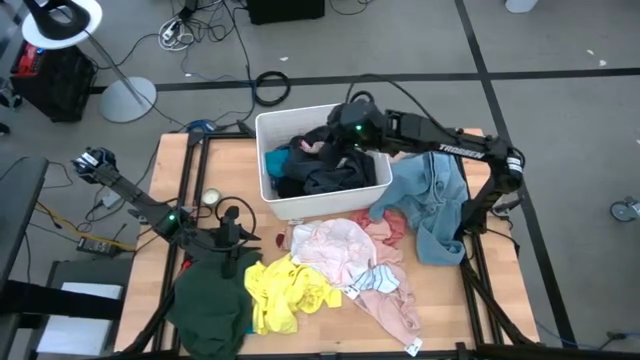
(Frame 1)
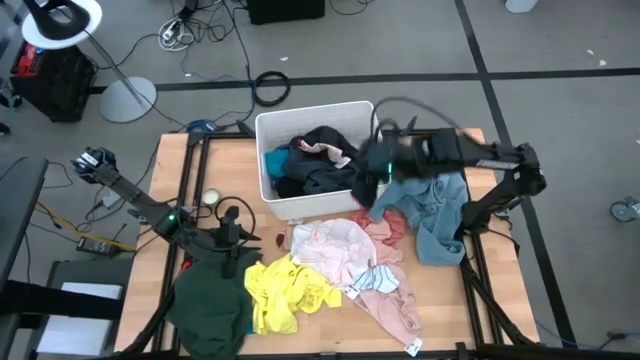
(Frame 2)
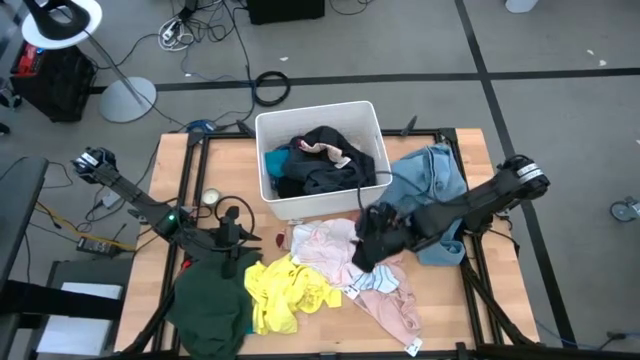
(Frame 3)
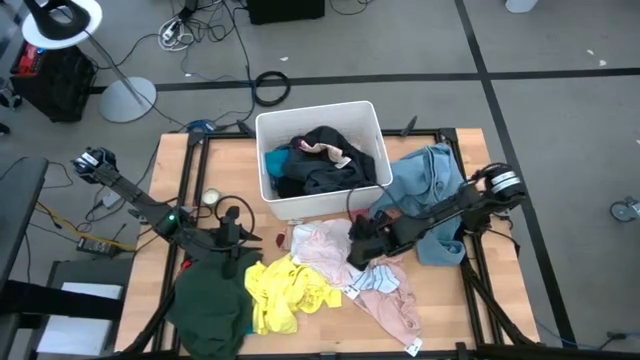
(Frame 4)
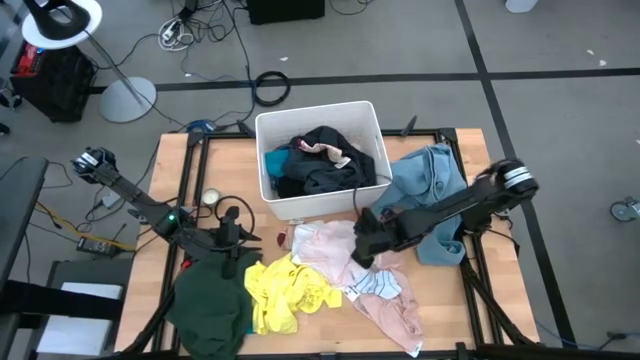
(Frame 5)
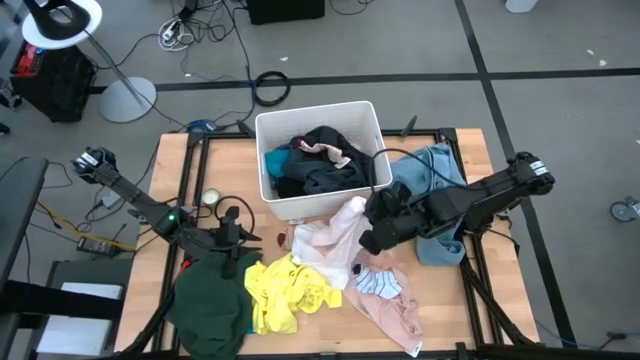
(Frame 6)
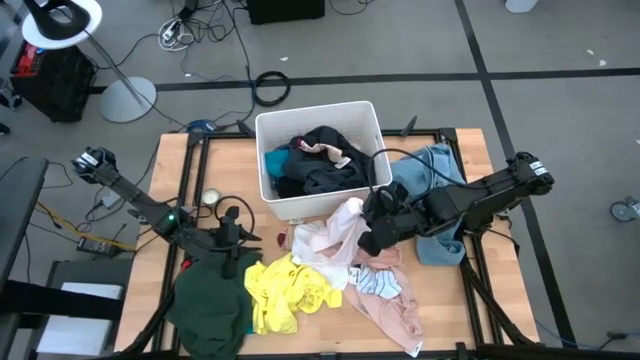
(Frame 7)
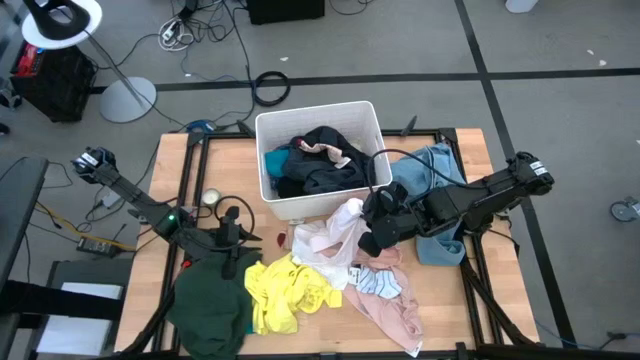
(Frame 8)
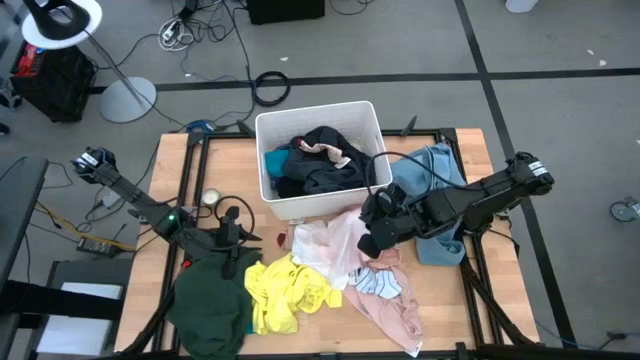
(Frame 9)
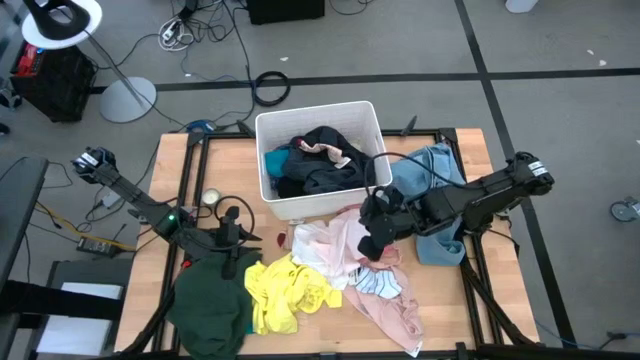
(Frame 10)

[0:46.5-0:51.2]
Task: Sort clothes
Put the light pink underwear into the white bin

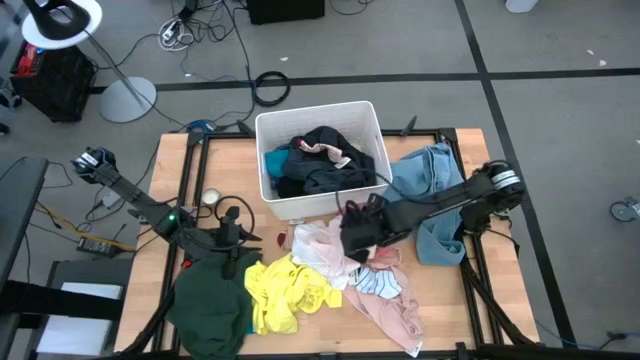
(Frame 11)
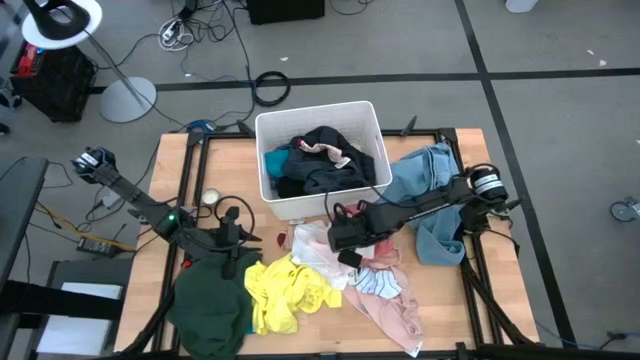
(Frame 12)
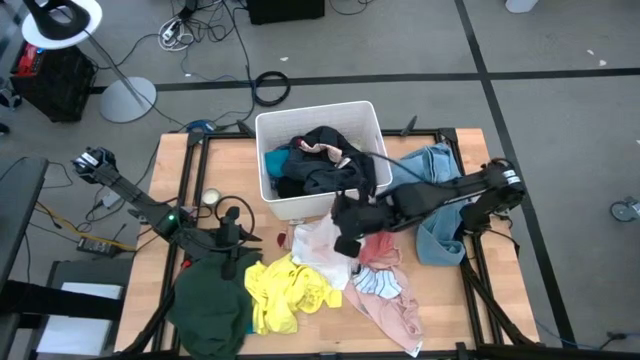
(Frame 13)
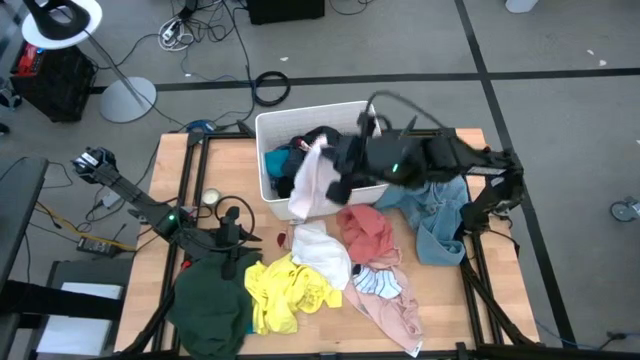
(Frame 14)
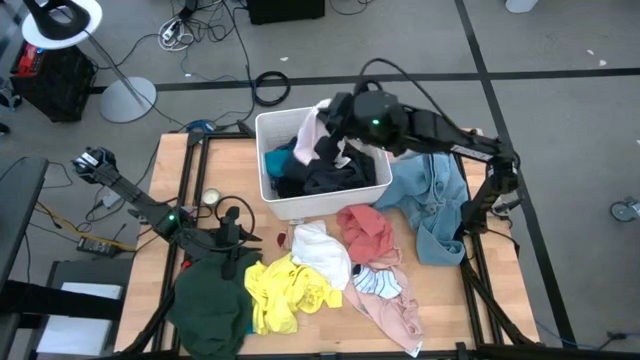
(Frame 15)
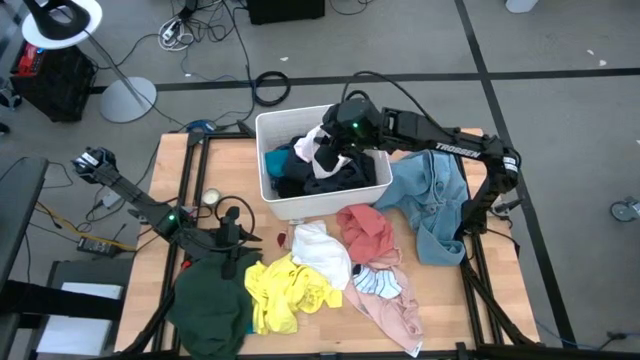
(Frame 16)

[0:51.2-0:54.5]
Put the light pink underwear into the white bin

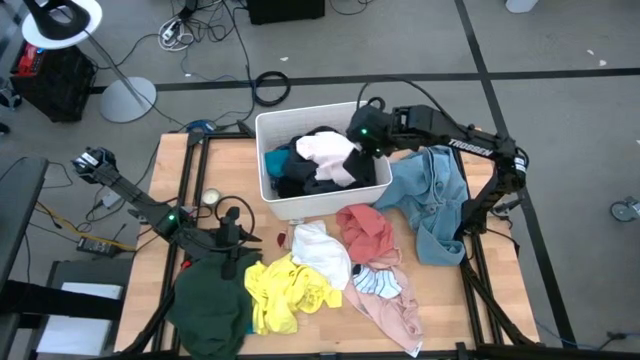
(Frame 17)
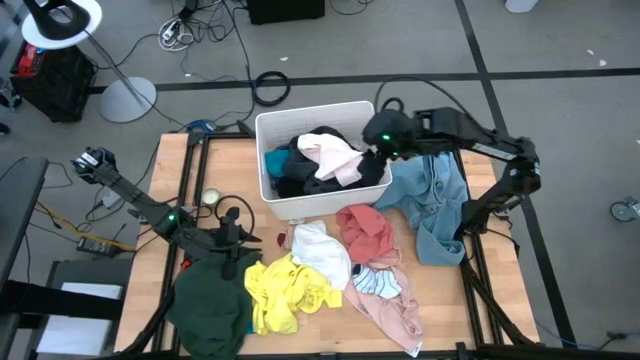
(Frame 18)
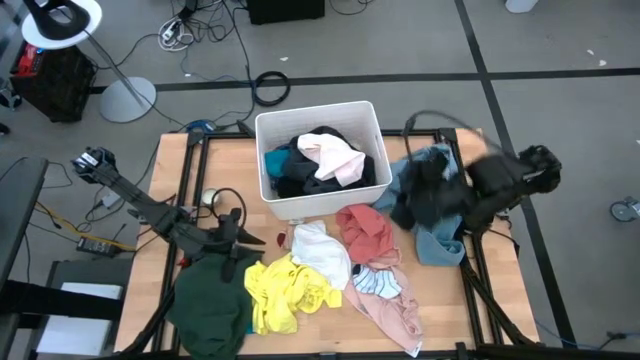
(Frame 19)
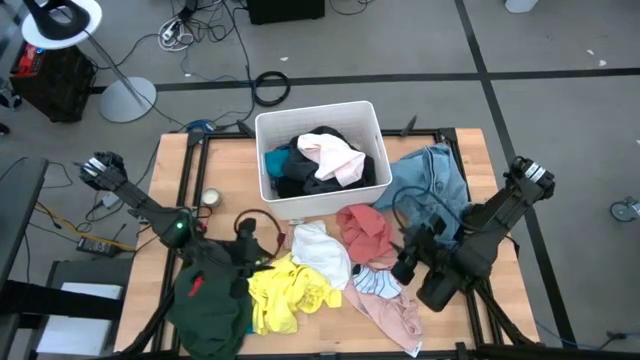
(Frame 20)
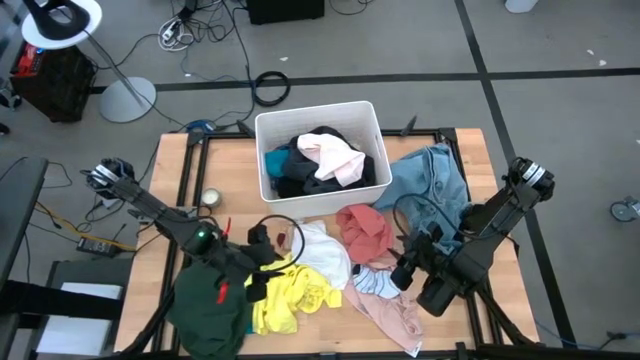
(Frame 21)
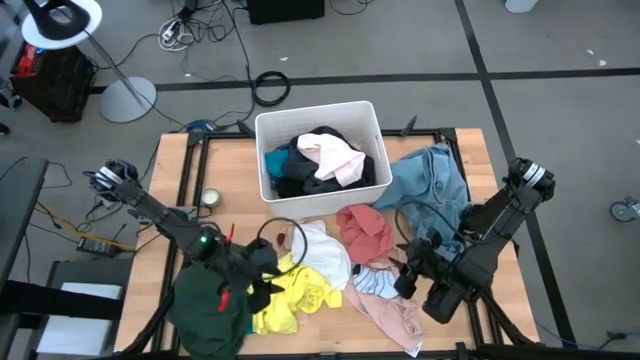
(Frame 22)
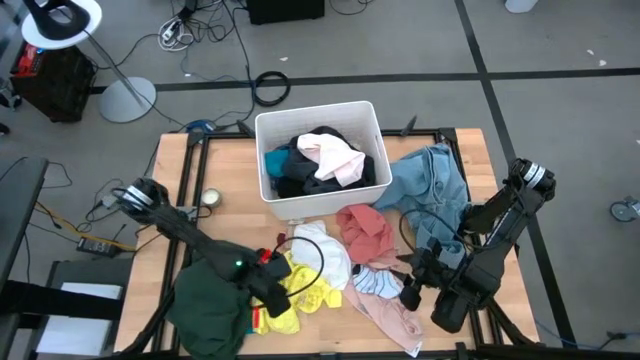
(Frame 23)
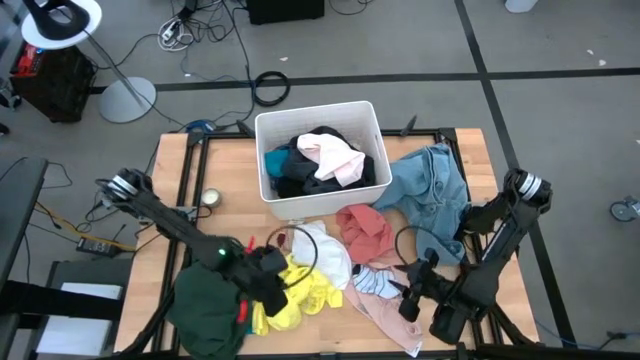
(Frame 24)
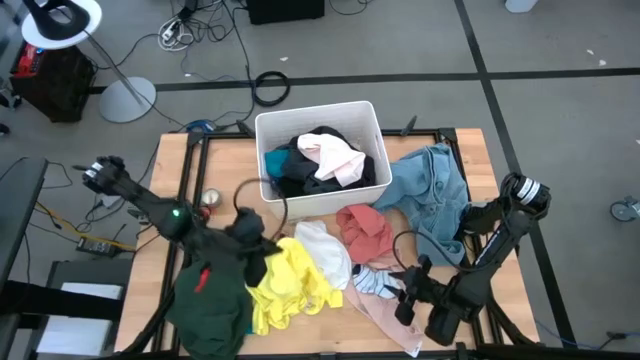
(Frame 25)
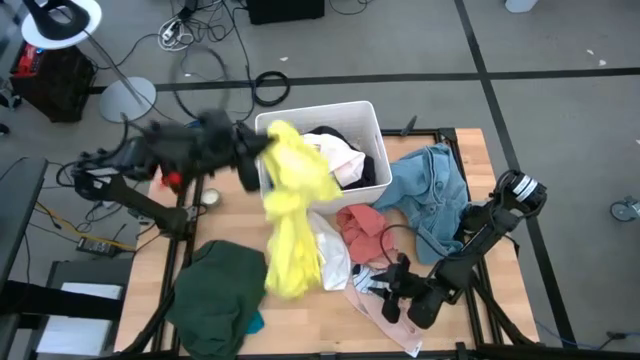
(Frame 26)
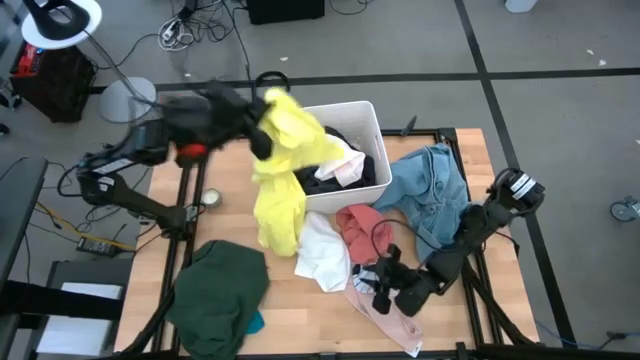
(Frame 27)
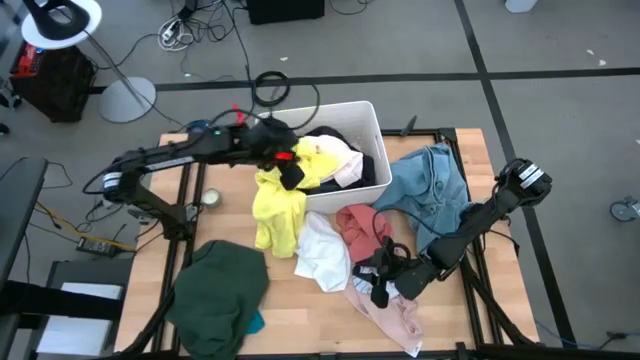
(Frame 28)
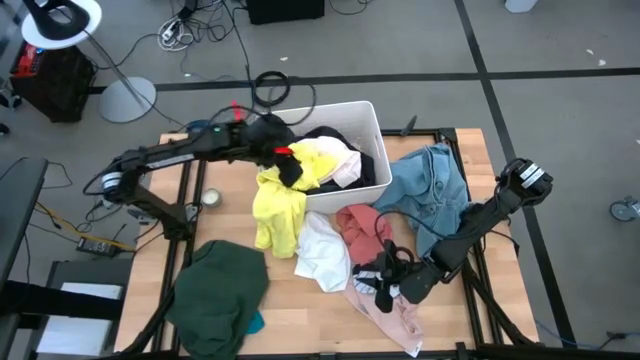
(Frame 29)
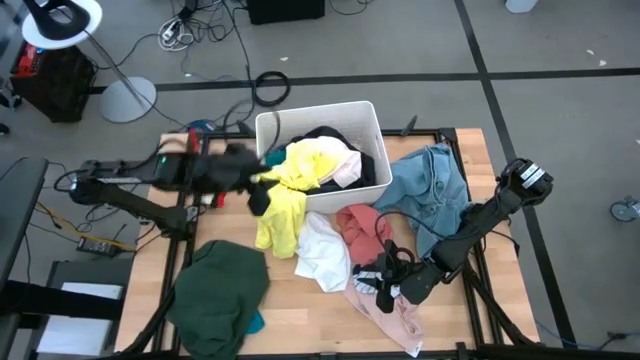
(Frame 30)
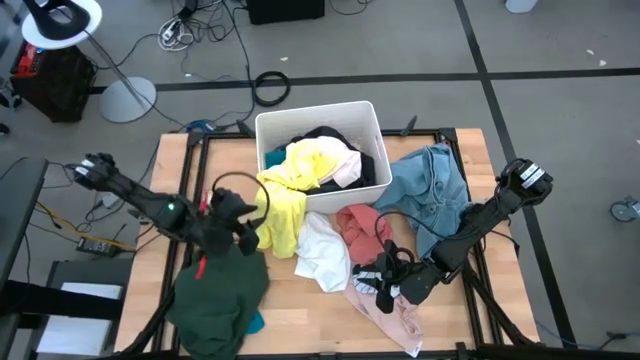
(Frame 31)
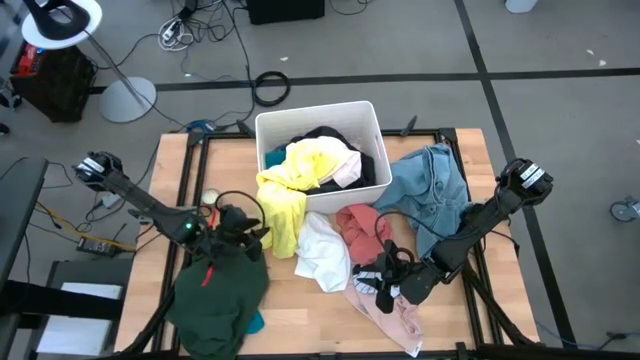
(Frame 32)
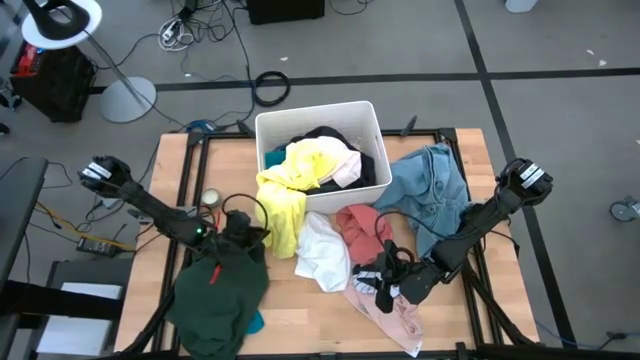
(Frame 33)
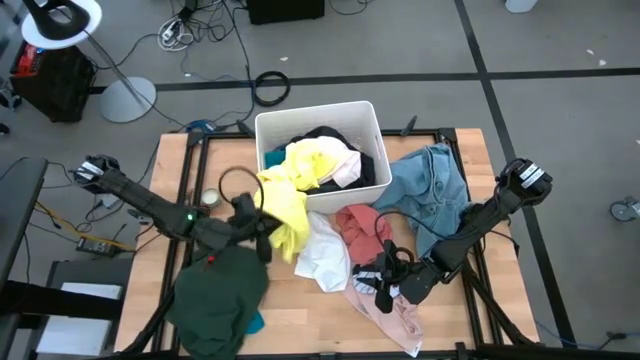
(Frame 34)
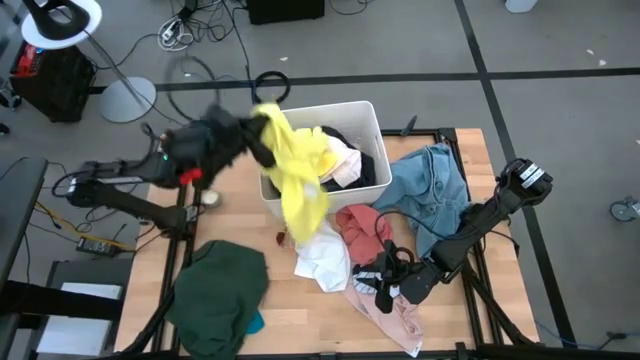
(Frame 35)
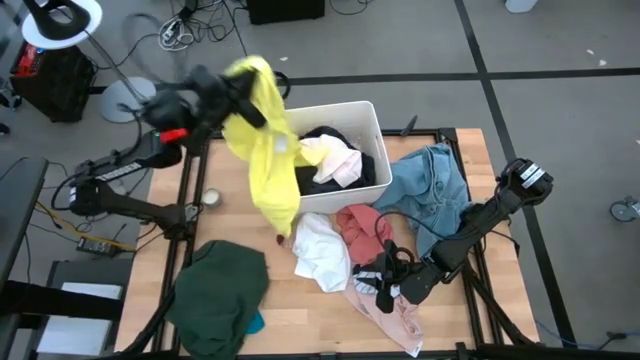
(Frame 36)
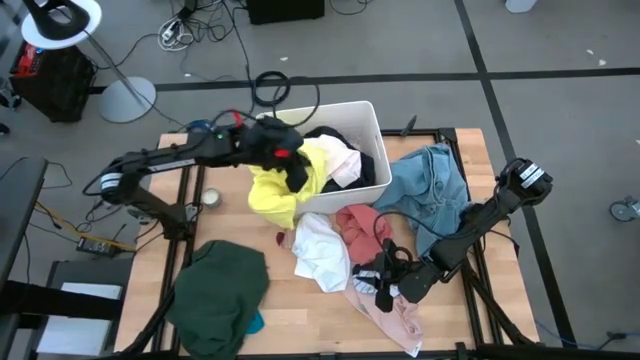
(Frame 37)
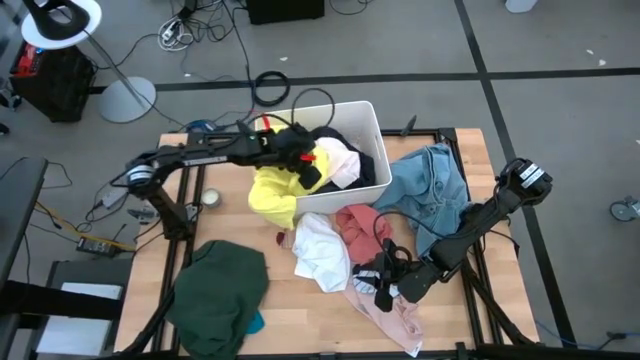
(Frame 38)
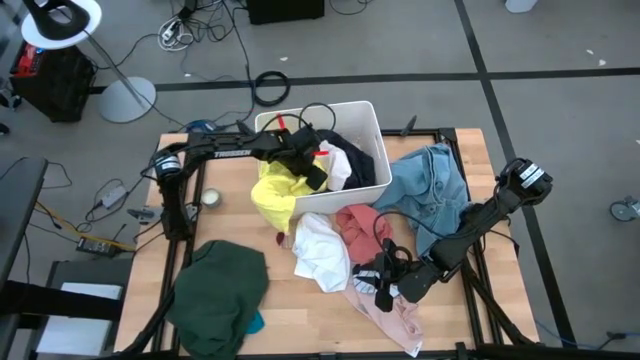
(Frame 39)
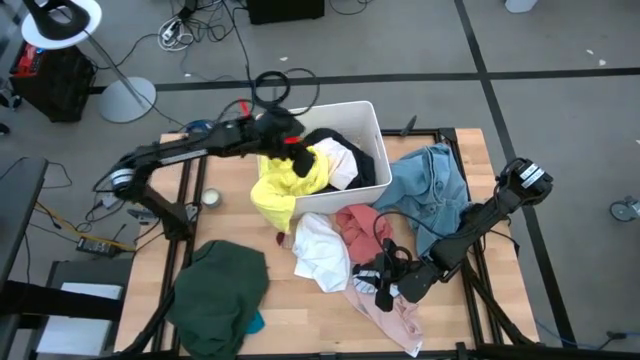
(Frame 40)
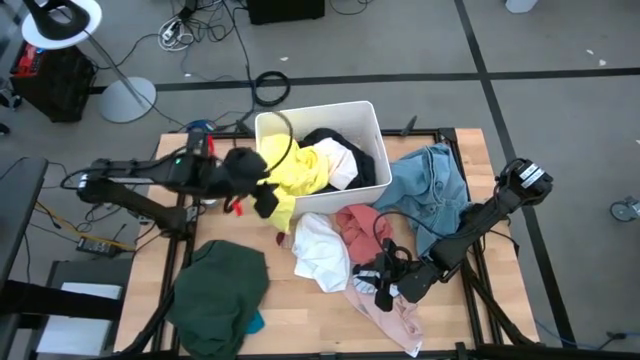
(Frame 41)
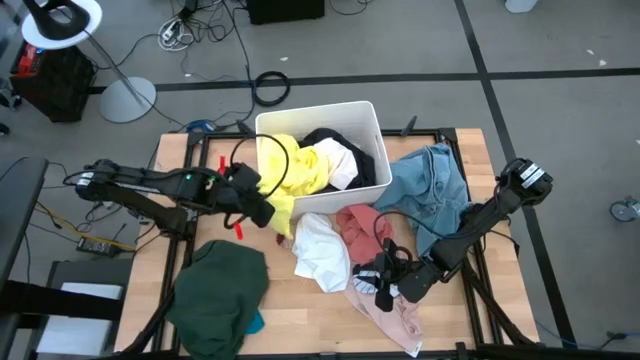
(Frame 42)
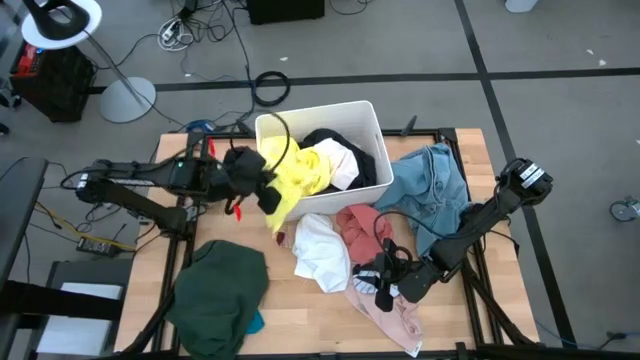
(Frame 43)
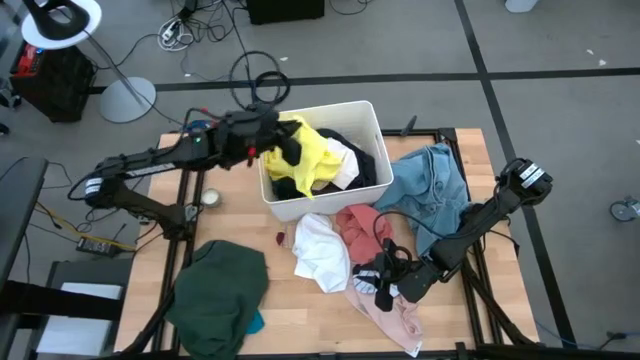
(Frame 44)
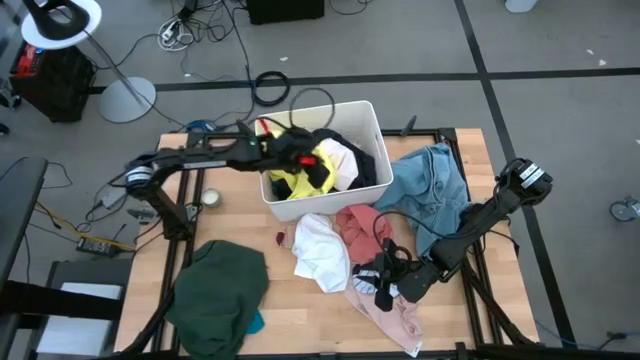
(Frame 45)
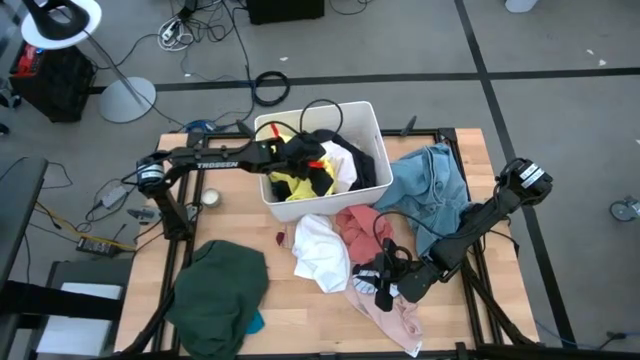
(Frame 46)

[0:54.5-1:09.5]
Put the yellow shirt into the white bin
